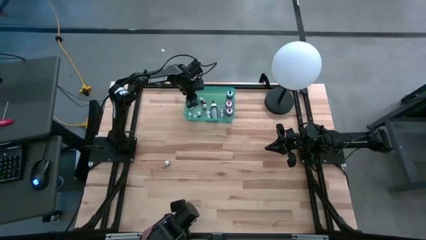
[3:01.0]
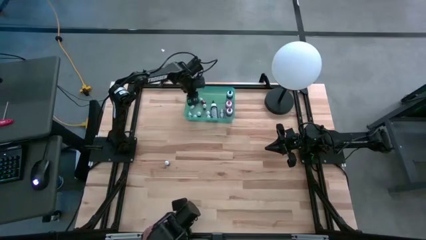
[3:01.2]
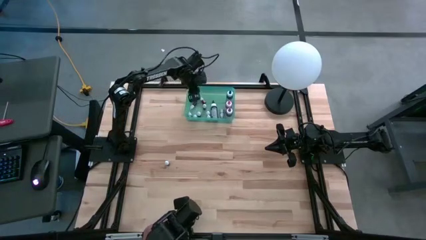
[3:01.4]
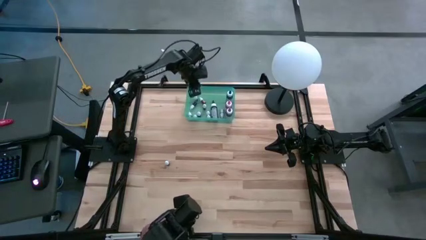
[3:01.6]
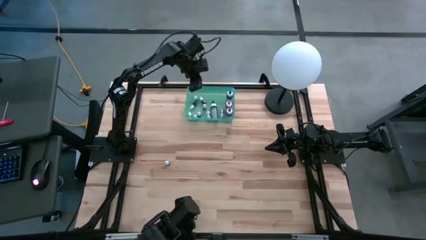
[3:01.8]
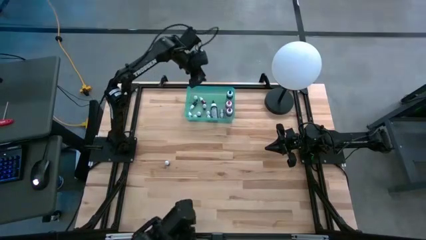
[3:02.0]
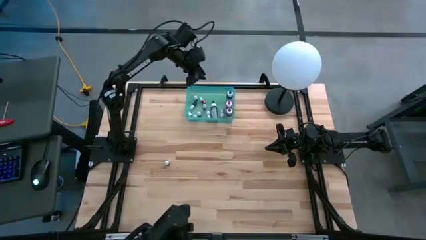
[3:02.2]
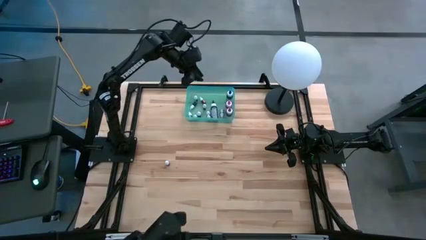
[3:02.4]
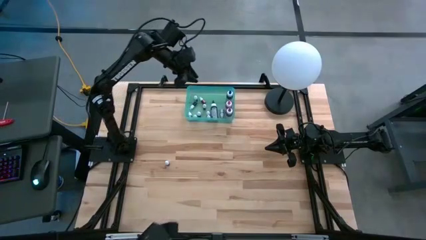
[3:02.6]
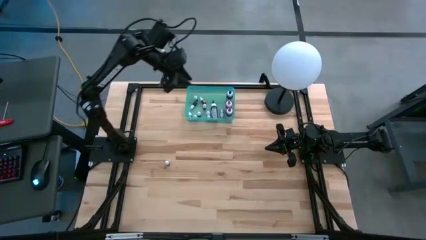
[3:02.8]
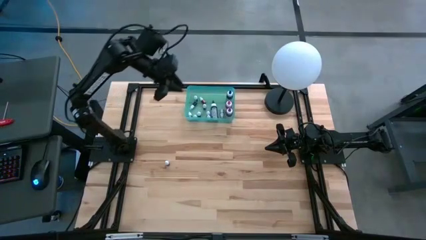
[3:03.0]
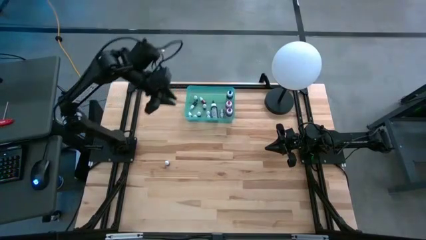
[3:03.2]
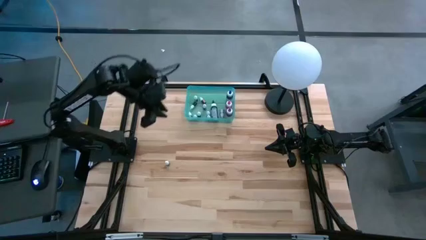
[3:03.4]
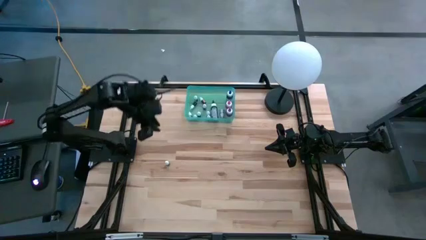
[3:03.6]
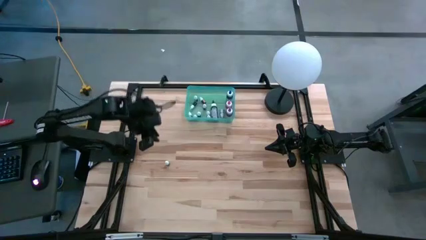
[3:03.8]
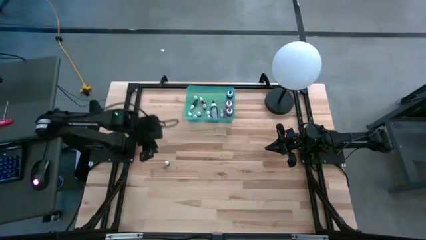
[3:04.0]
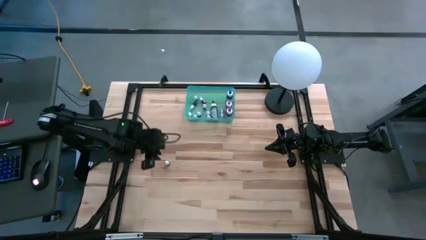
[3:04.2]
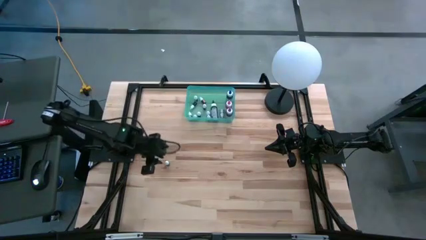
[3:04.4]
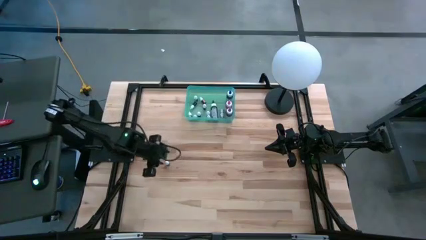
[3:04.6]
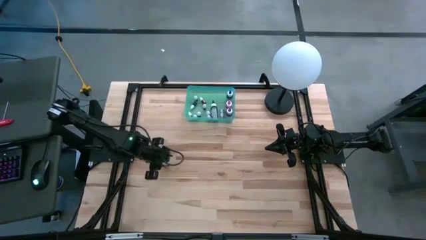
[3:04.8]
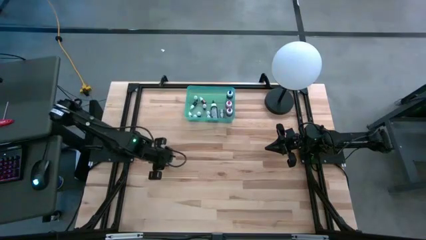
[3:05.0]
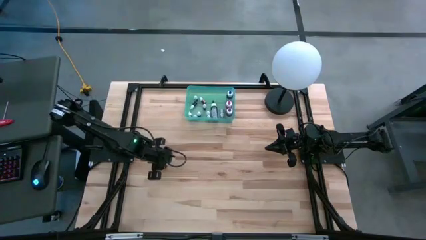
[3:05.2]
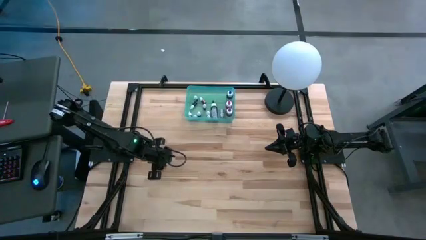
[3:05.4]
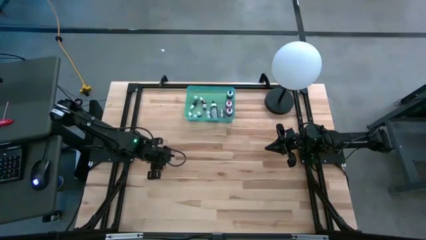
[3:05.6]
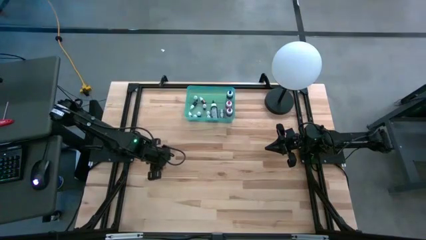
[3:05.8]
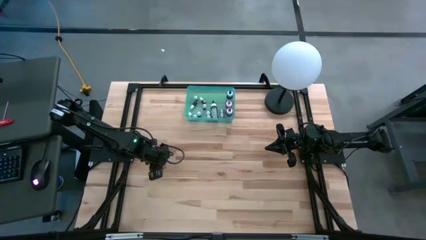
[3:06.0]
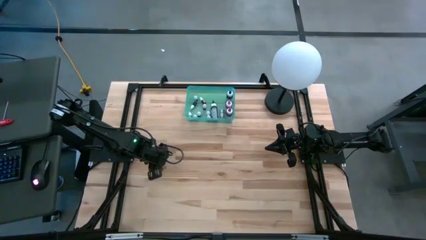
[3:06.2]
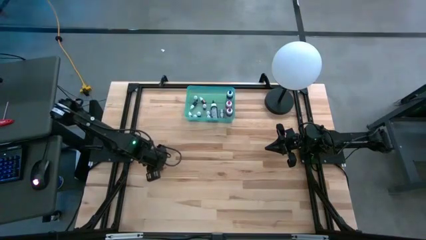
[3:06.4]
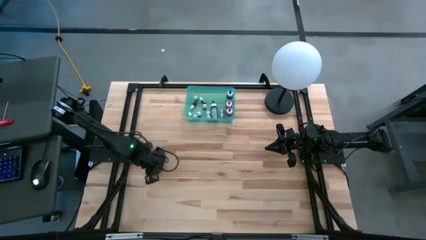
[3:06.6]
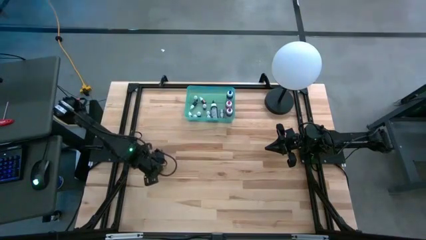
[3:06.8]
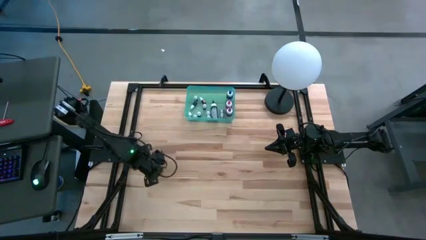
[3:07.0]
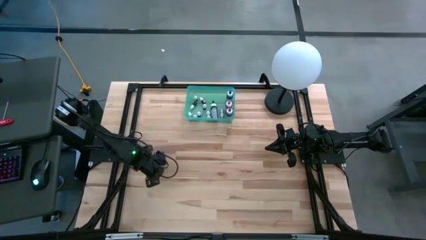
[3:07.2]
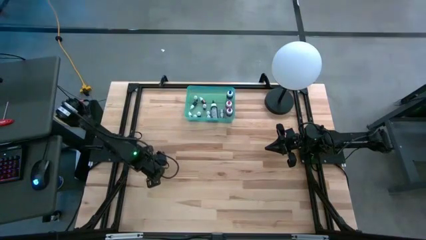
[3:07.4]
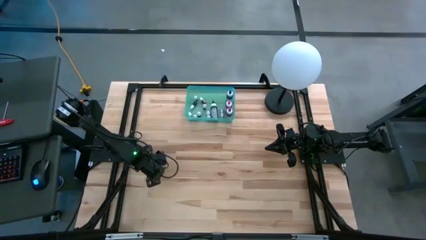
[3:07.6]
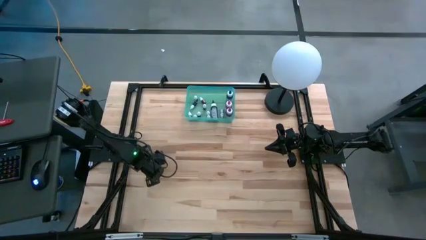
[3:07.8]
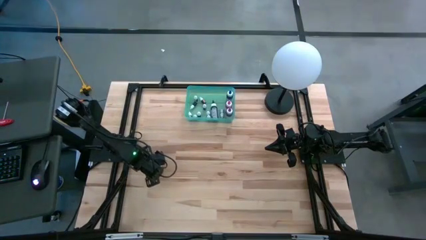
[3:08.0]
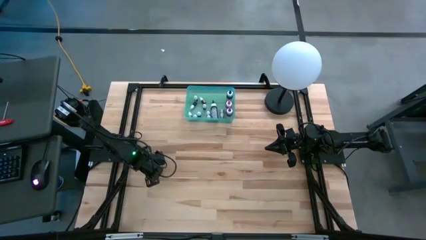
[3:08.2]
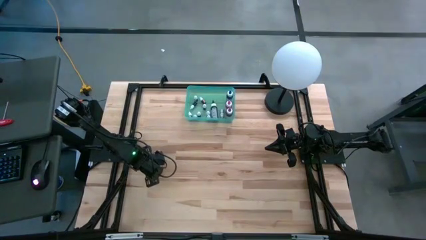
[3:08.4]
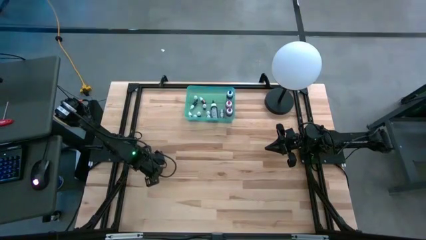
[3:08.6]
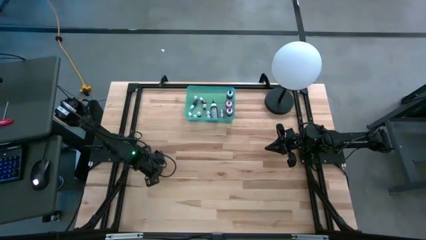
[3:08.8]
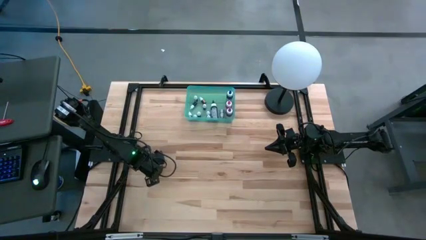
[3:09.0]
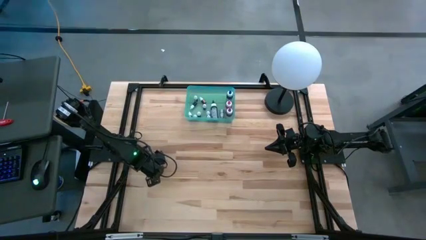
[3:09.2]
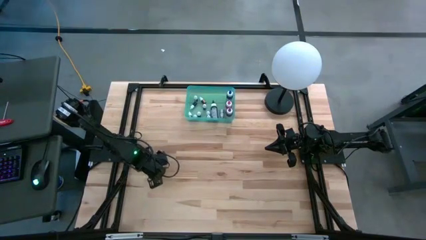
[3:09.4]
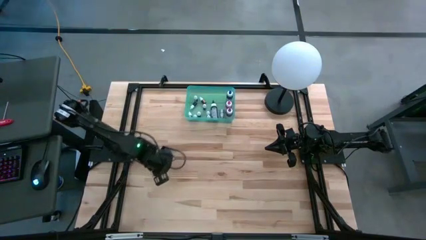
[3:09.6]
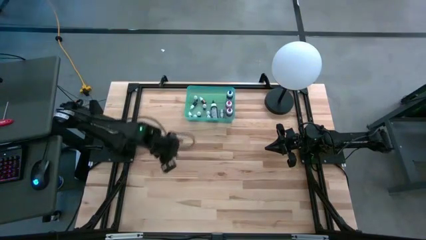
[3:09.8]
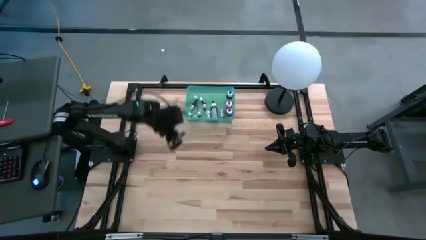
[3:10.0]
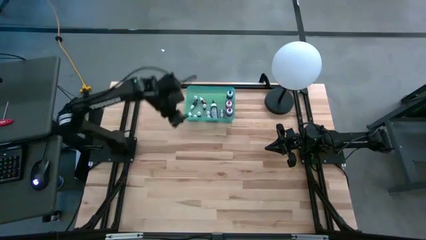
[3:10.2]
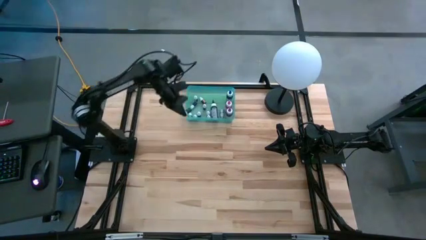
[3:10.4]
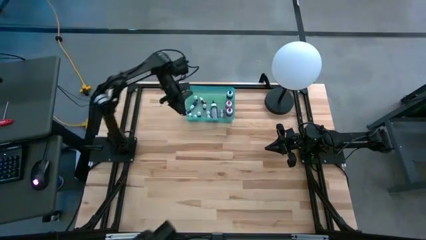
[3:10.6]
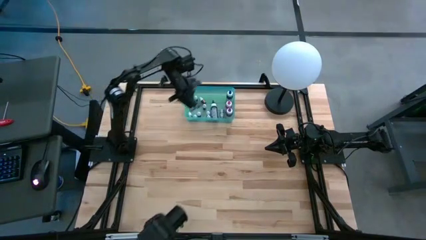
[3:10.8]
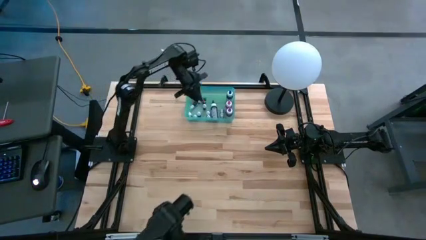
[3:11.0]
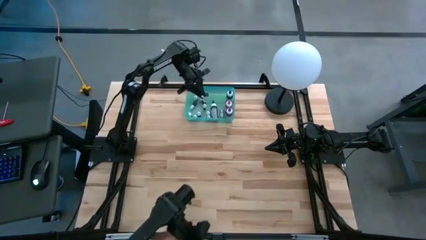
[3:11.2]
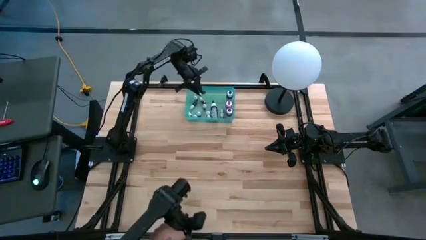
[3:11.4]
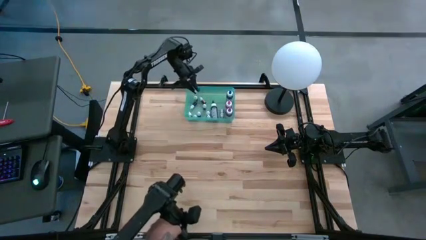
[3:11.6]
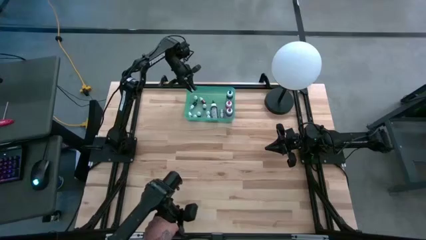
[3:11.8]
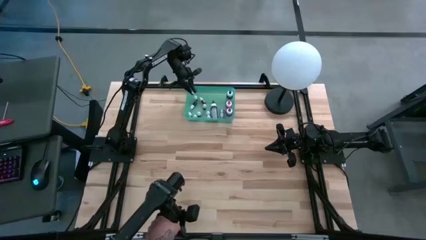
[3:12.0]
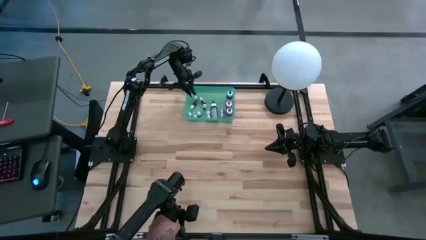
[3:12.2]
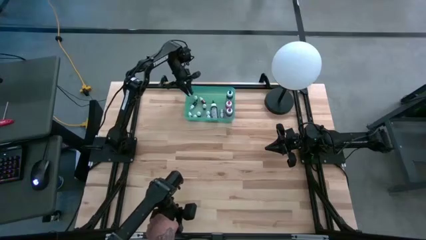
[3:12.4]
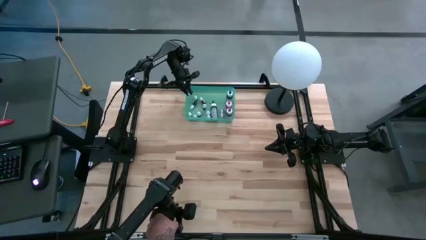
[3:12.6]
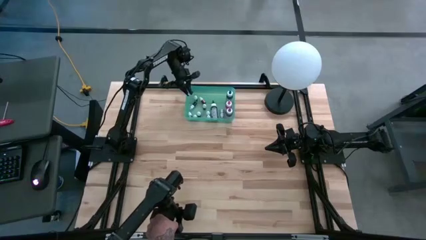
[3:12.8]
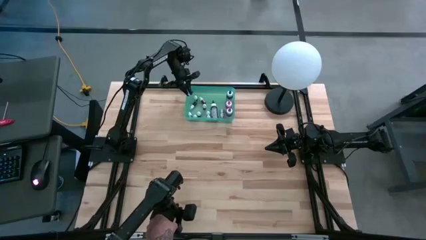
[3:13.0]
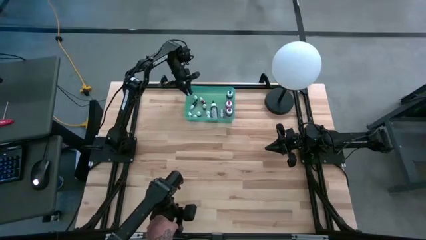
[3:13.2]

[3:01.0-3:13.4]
Task: Pick & Place food coloring
Put the small green food coloring into the bin

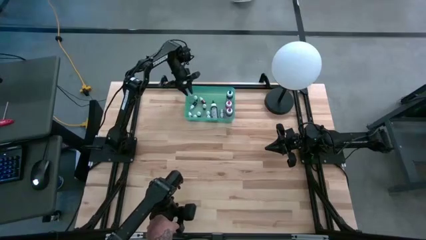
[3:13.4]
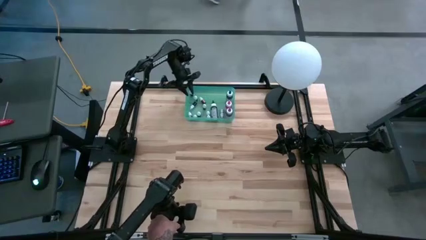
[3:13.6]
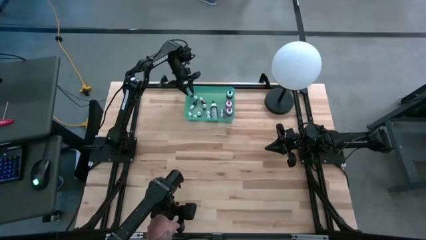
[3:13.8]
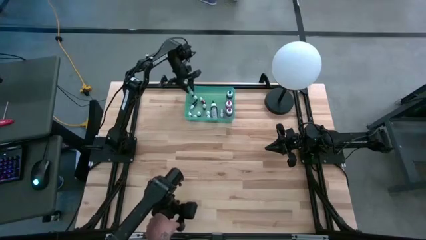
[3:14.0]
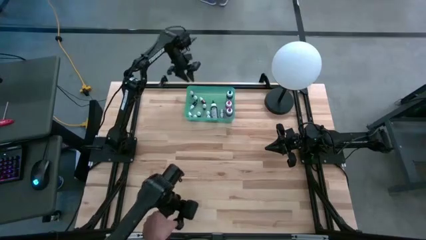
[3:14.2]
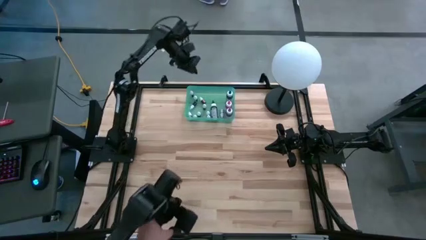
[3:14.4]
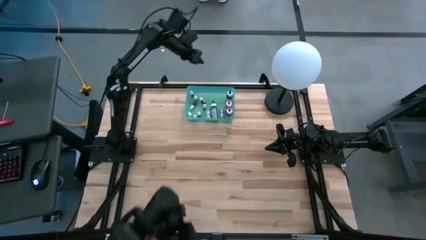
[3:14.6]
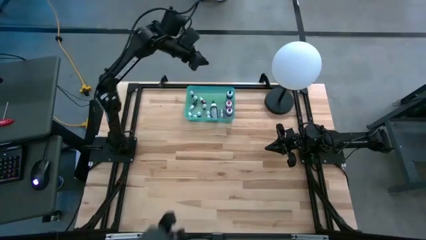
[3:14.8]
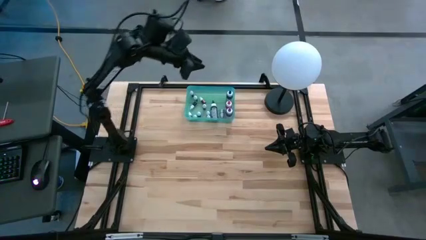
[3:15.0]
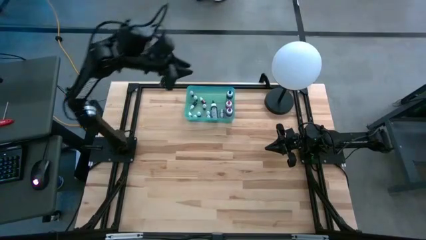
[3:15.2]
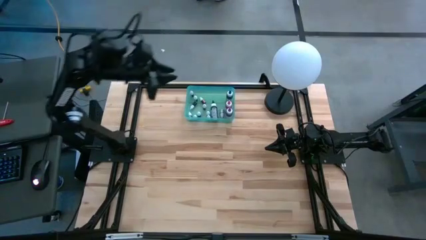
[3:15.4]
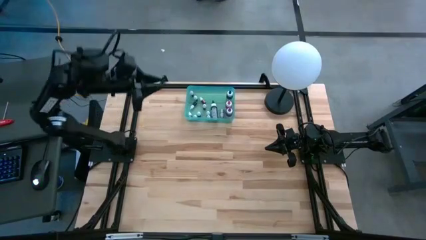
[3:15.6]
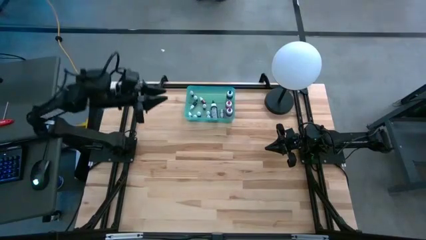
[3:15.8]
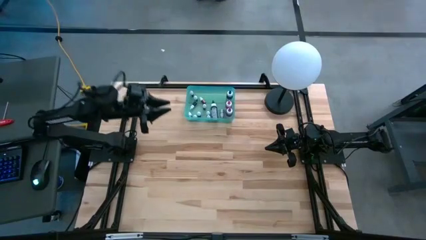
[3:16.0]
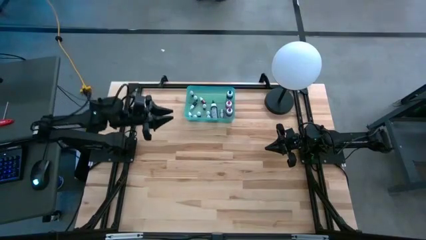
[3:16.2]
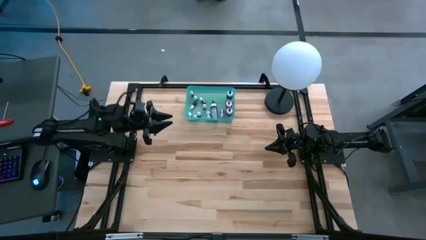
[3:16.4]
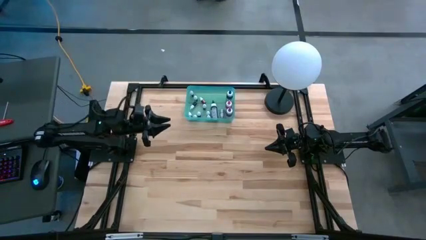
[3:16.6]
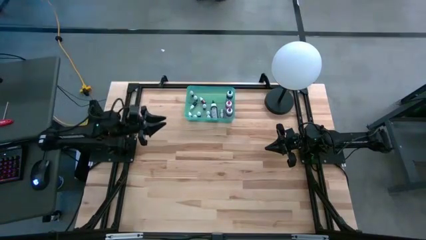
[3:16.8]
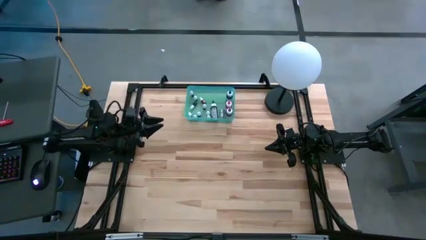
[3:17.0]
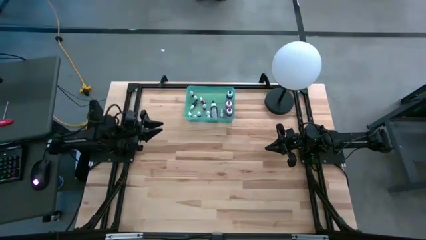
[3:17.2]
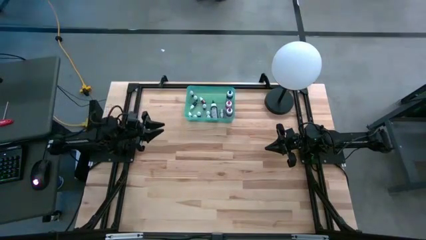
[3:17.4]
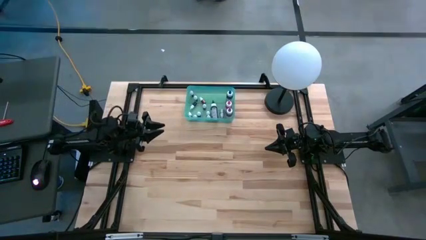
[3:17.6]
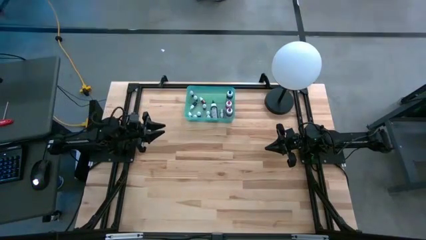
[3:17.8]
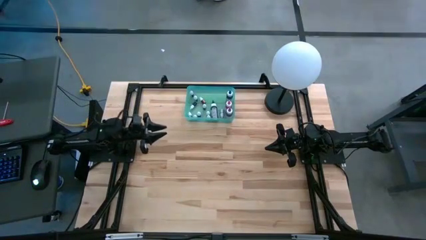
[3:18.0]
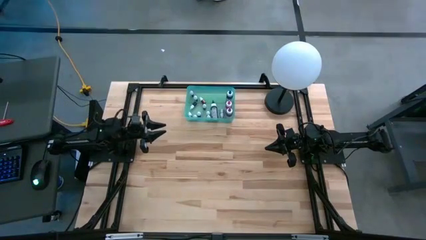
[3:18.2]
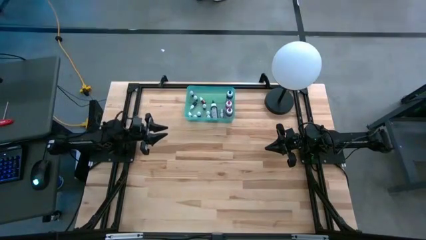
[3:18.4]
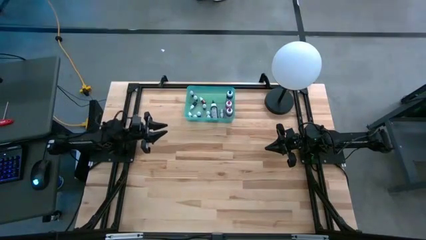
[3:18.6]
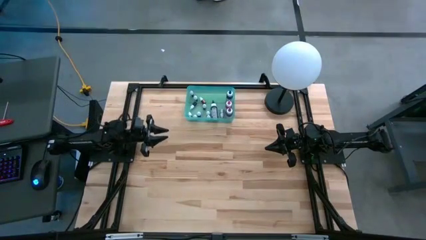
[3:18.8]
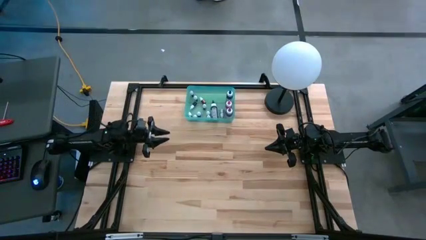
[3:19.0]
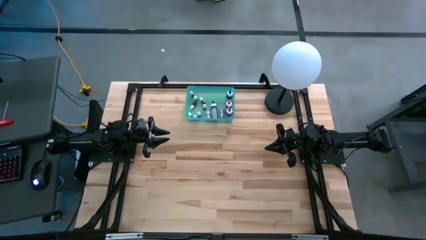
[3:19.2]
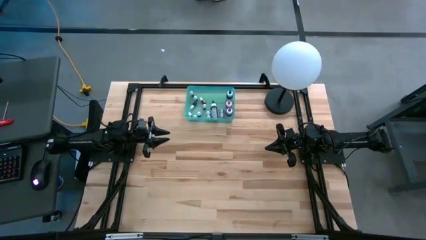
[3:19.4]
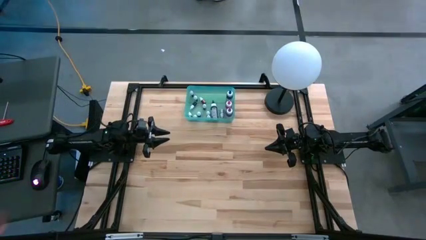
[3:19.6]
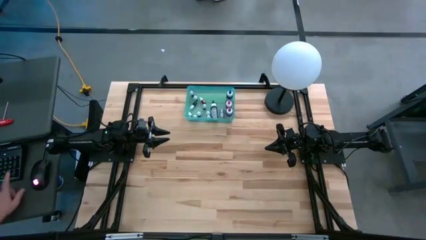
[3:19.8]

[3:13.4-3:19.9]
Return to Home Position
